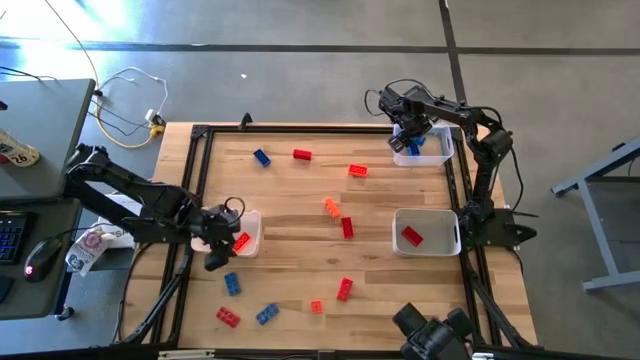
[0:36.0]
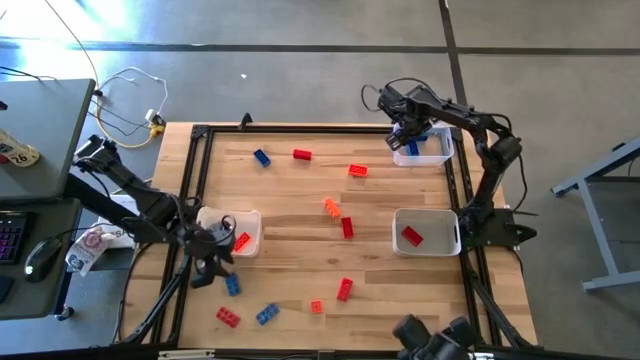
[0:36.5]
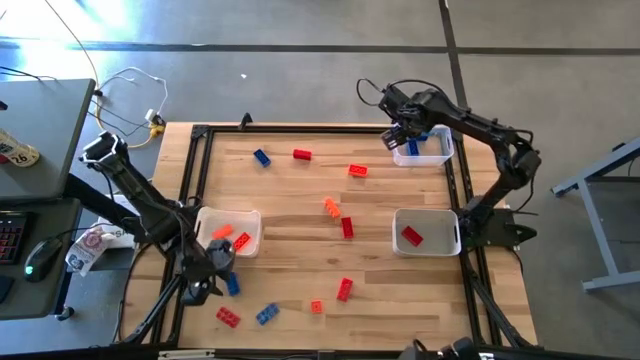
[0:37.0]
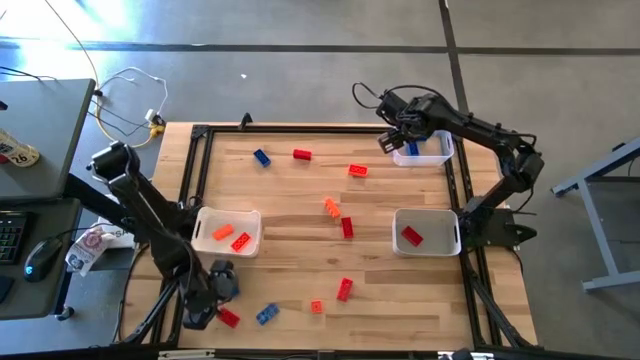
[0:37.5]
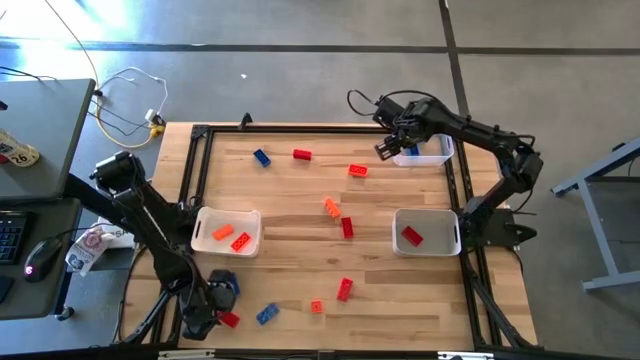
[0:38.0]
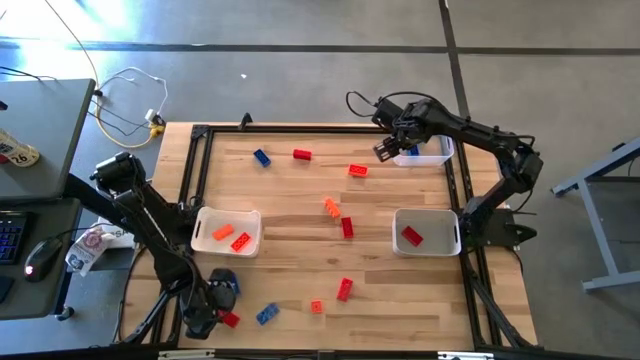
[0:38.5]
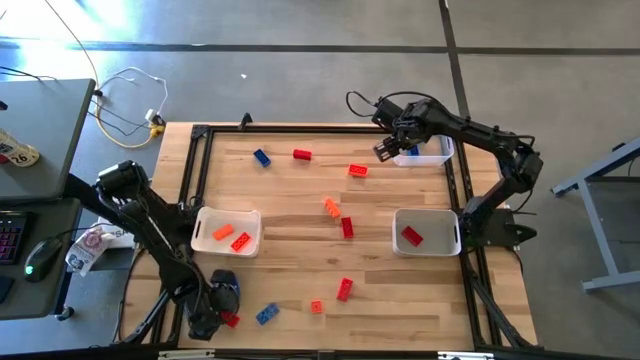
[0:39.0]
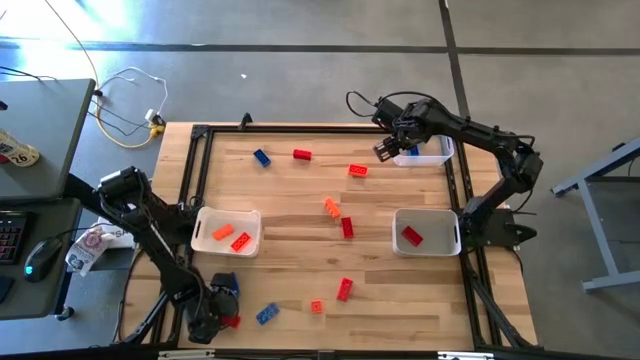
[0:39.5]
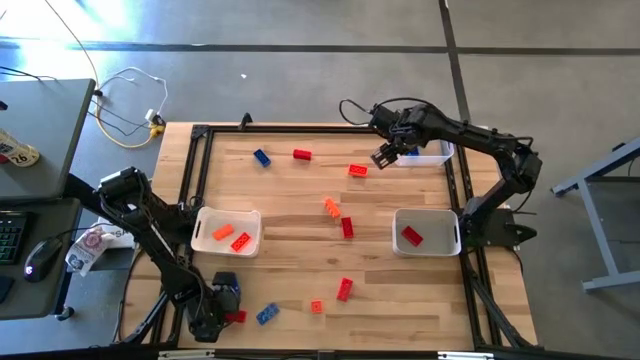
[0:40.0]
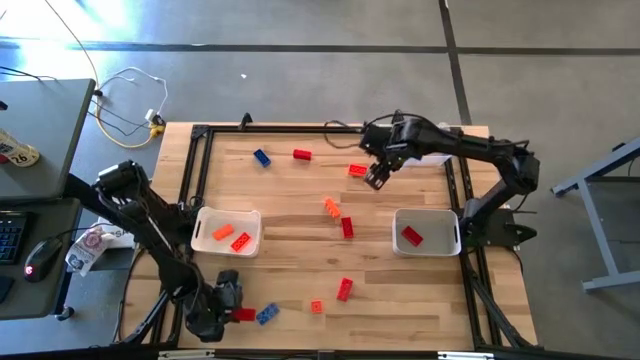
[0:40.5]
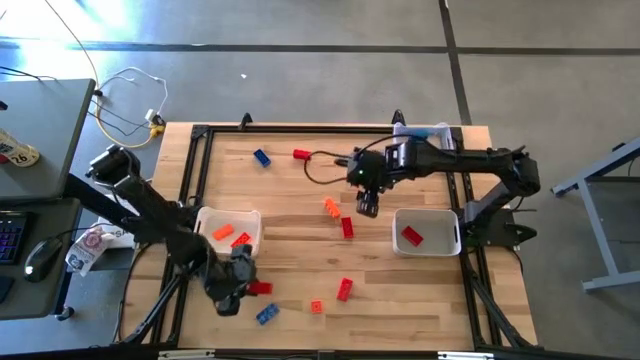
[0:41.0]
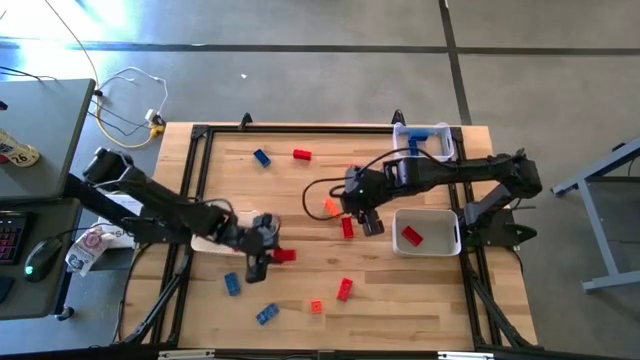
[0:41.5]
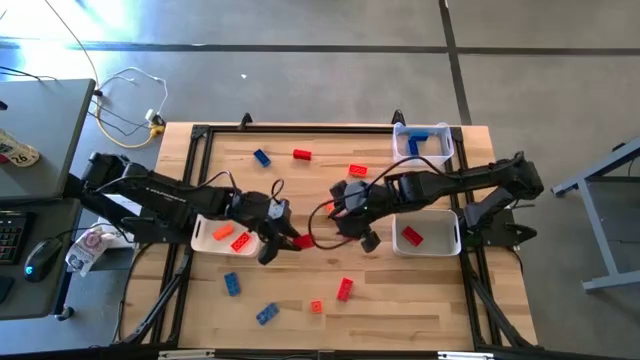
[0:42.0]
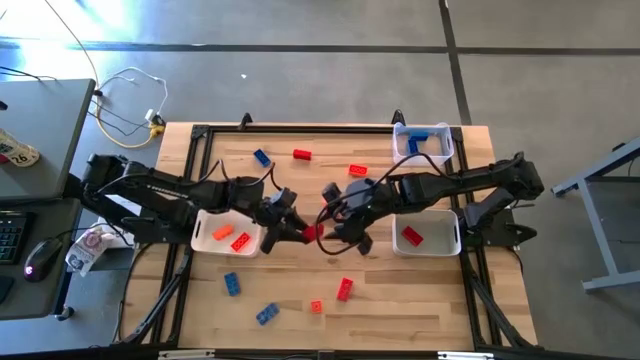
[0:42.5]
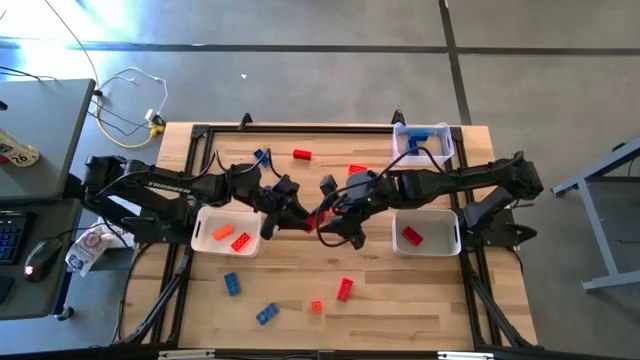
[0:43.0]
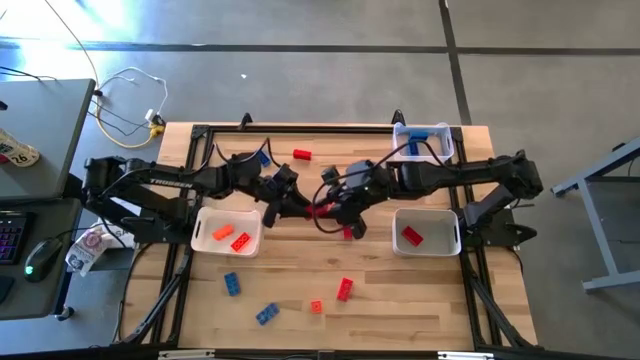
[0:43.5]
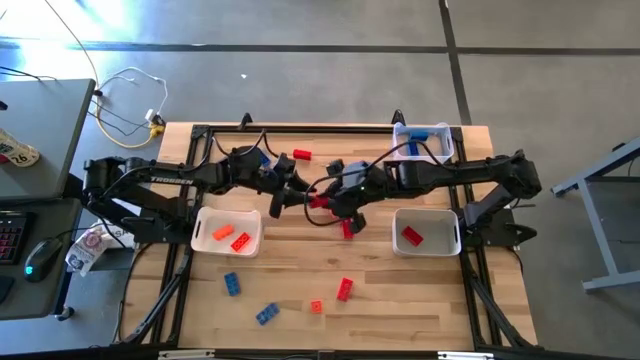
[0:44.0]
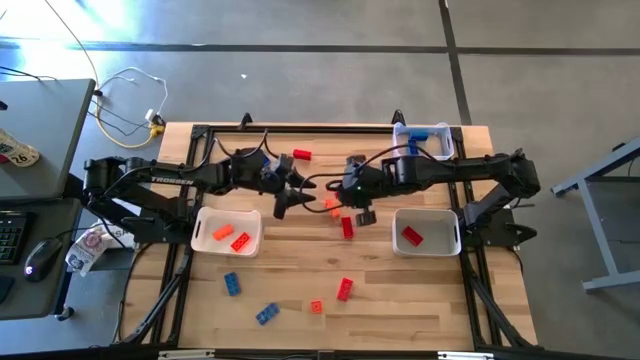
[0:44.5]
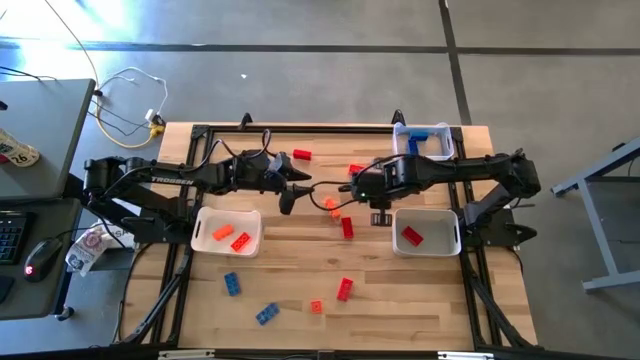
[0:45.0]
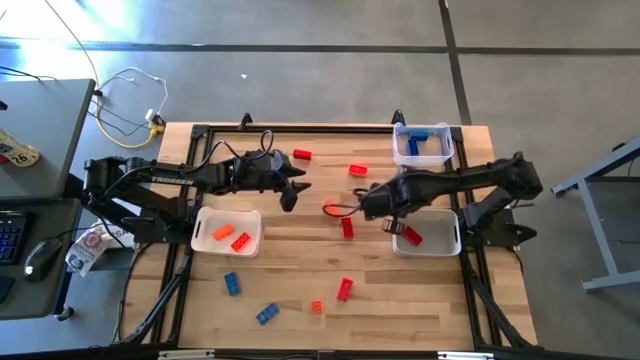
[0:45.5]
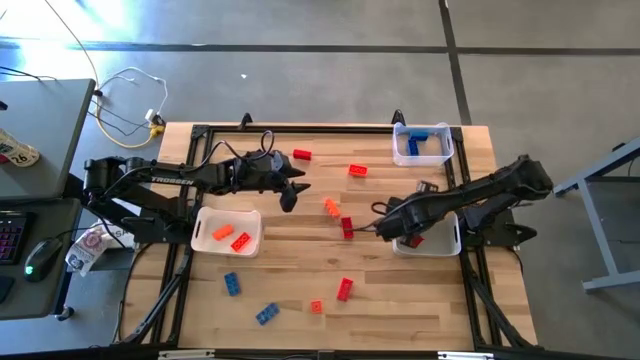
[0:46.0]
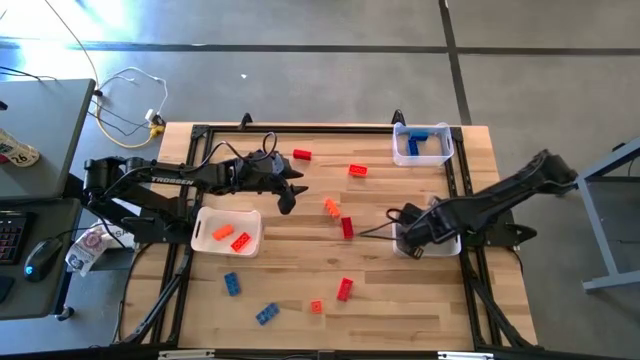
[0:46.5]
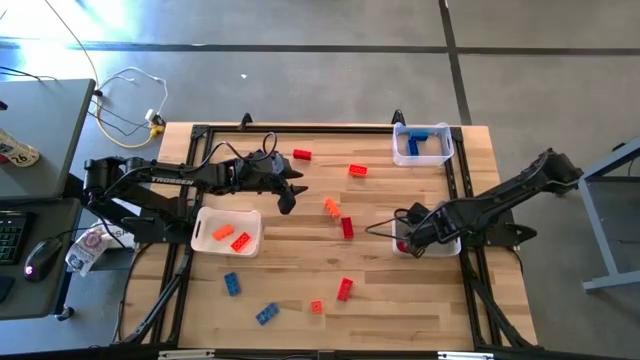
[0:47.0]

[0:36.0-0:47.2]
Task: Sort & place blocks by color
Put the red game piece into the gray bin

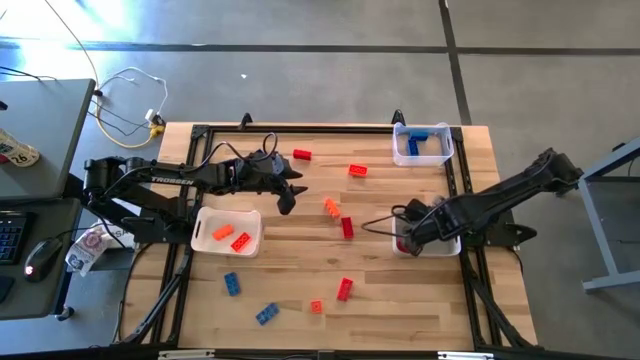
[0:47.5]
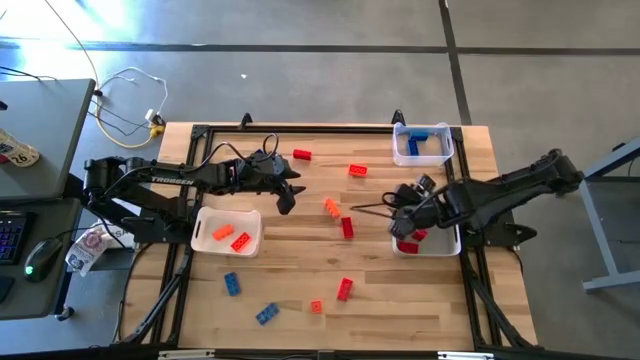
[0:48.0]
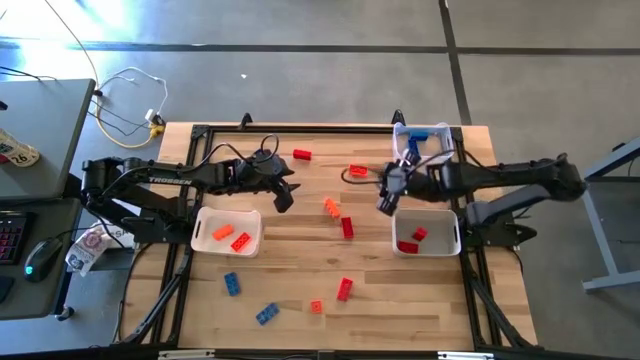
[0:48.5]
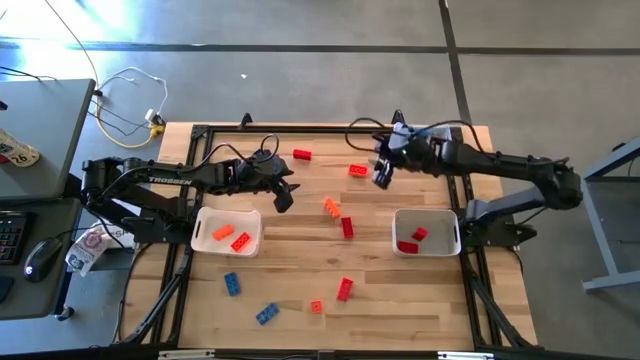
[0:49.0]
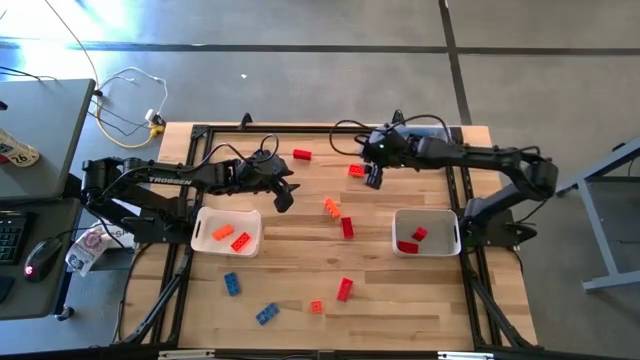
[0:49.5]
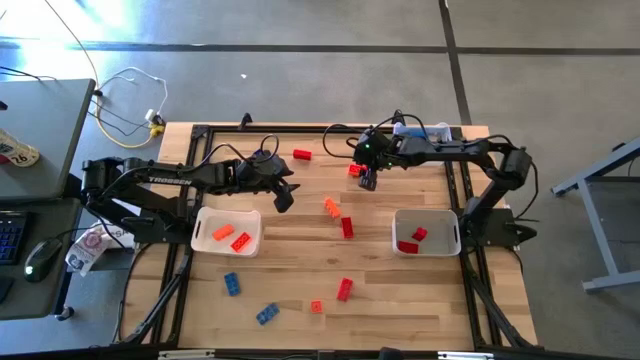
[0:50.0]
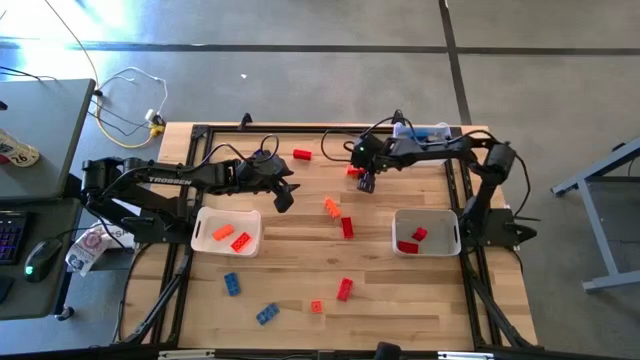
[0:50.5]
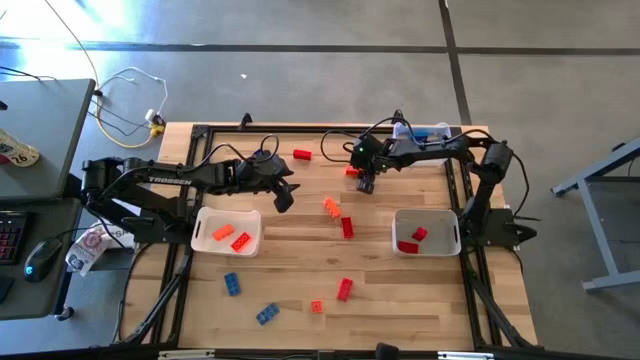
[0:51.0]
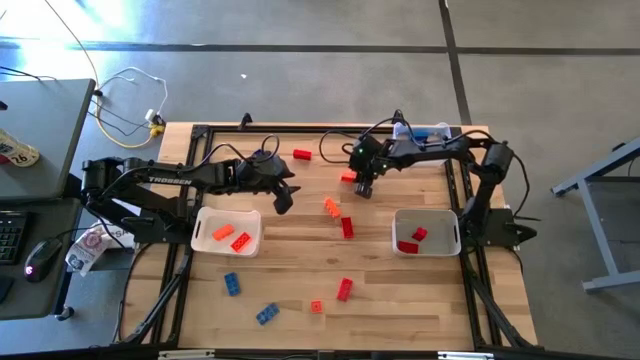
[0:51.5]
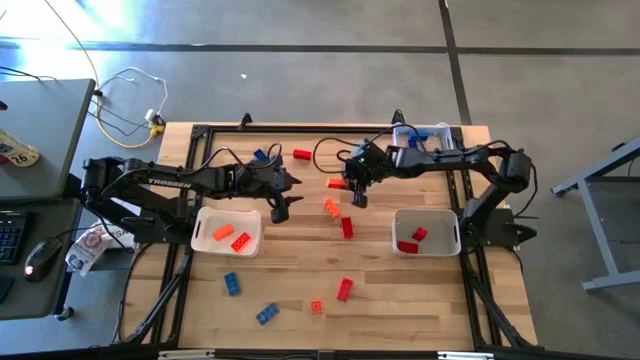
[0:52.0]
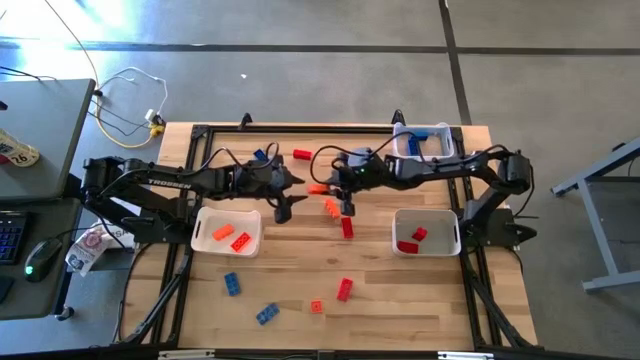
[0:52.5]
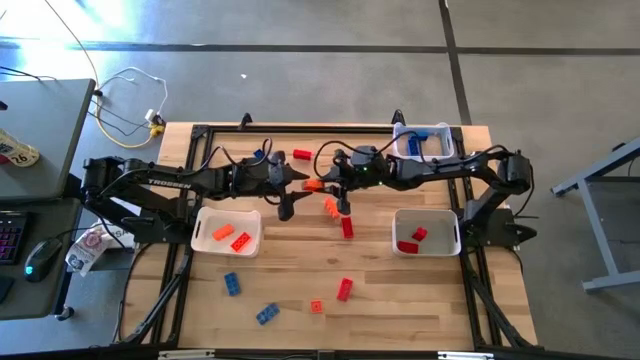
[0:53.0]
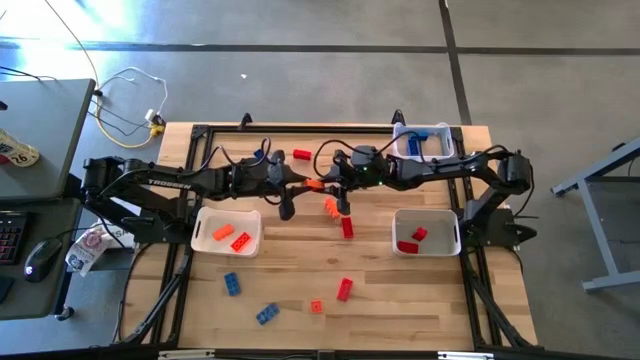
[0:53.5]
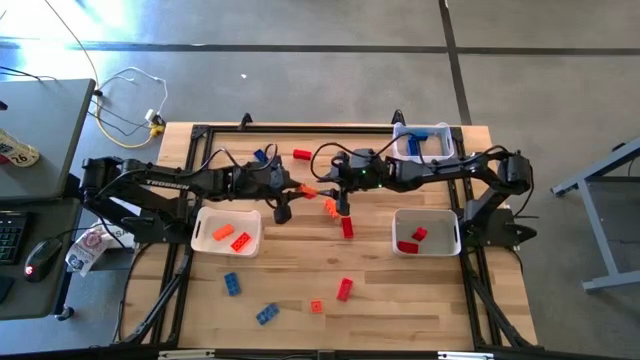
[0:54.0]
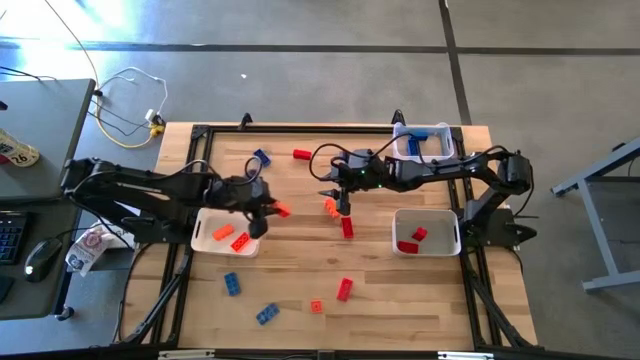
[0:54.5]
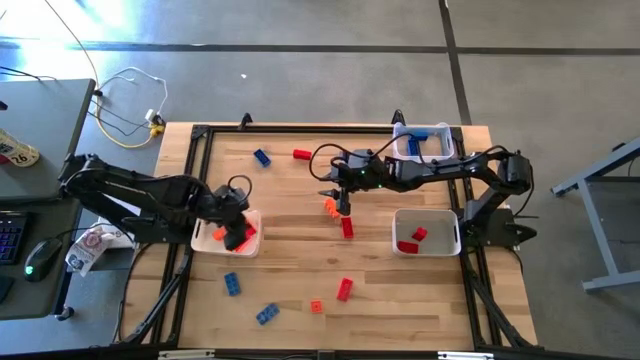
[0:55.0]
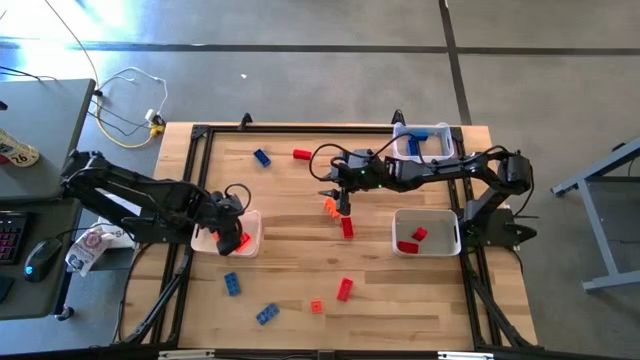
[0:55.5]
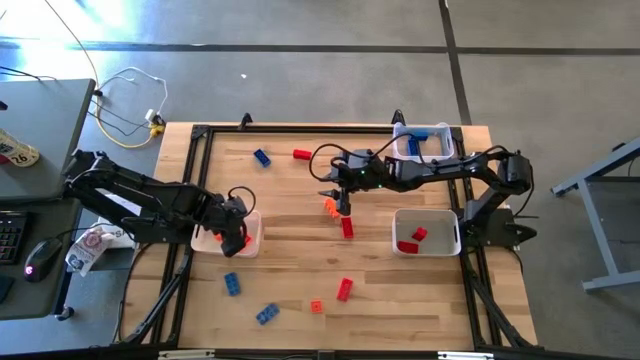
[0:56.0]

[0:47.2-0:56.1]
Put the orange game piece into the white bin

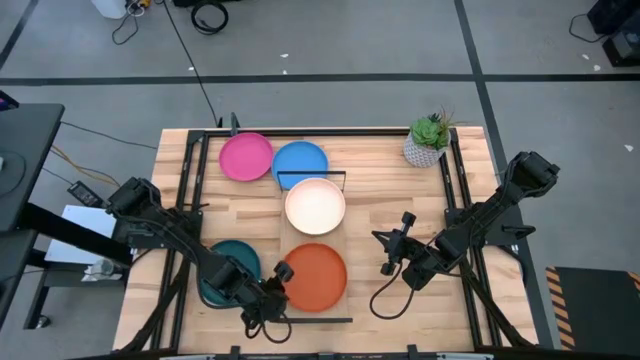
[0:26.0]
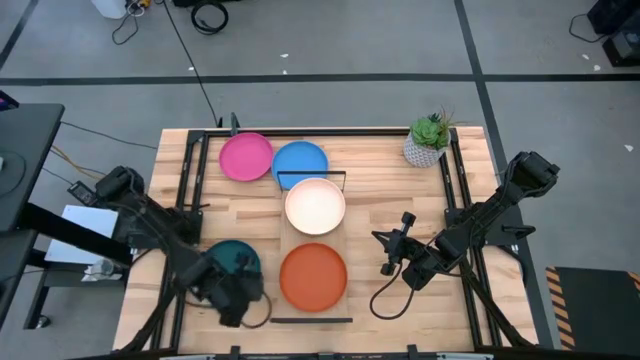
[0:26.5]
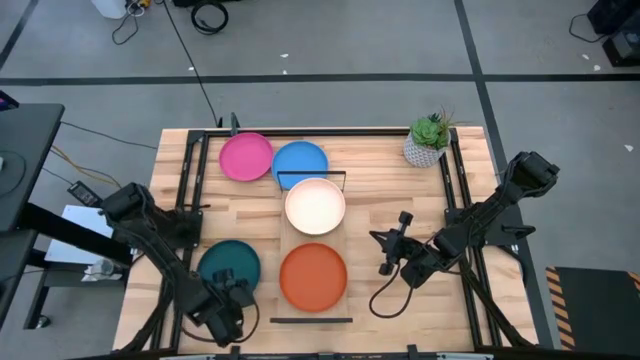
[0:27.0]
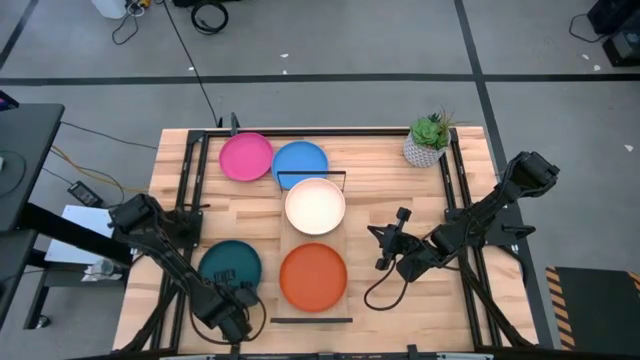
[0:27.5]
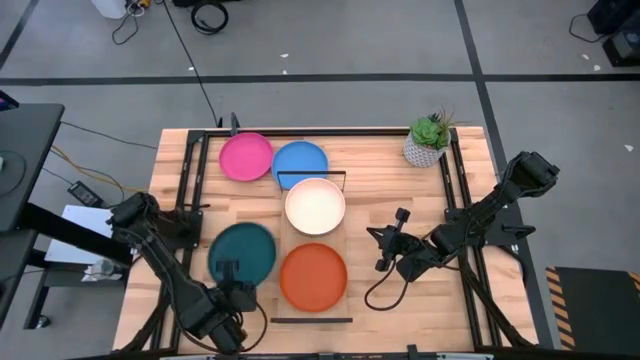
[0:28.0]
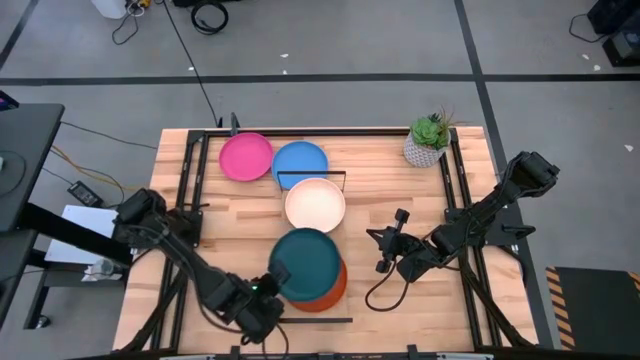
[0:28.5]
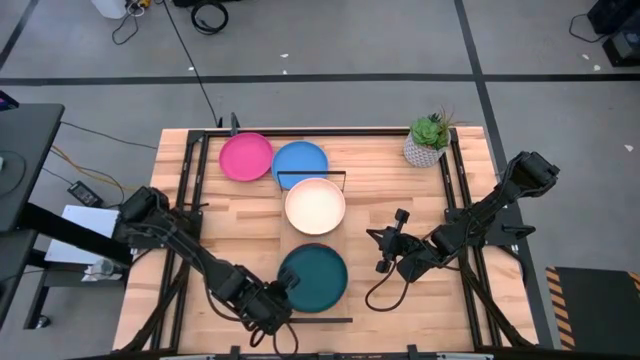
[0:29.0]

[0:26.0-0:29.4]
Task: Place and stack plates onto a shelf
Stack the green plate on top of the orange plate on the shelf
